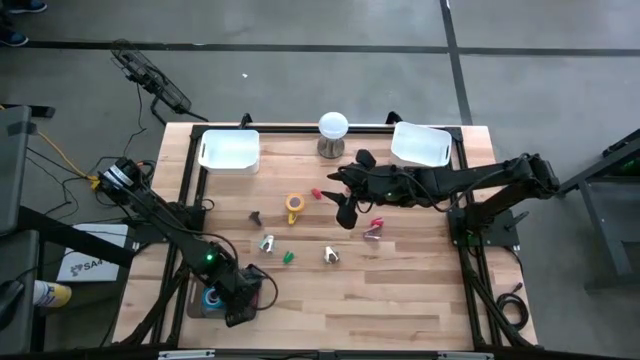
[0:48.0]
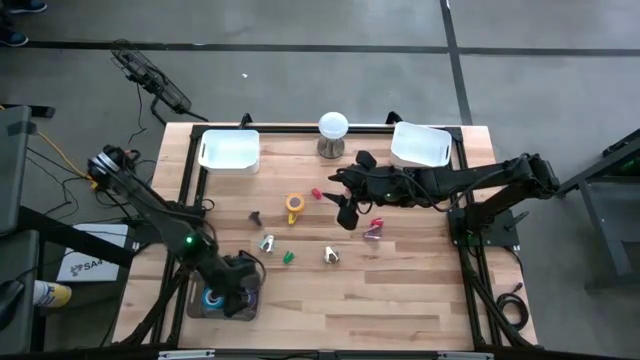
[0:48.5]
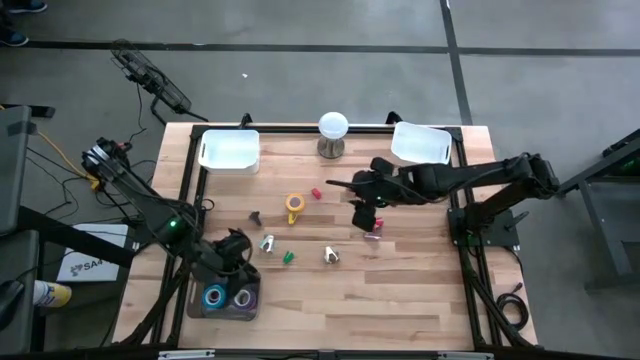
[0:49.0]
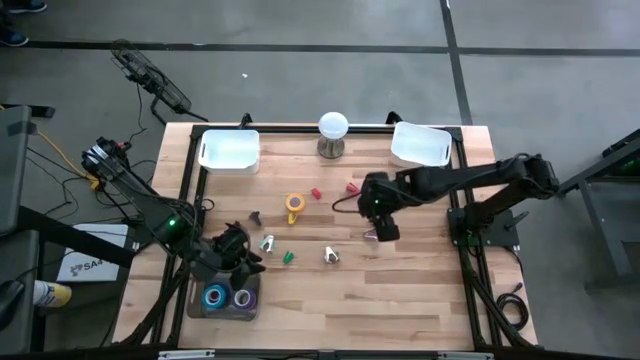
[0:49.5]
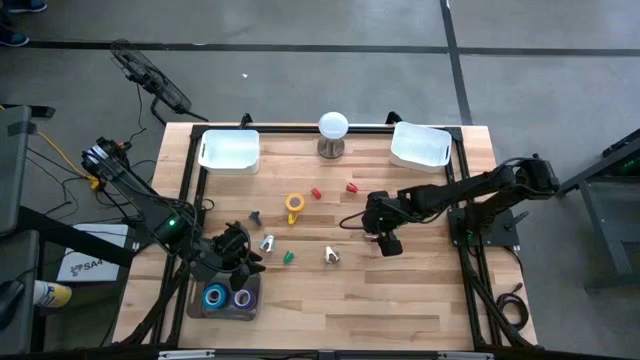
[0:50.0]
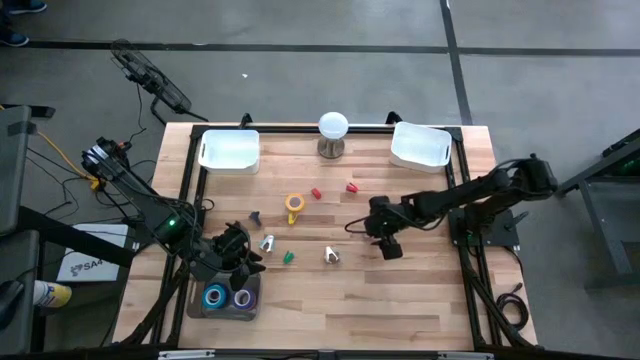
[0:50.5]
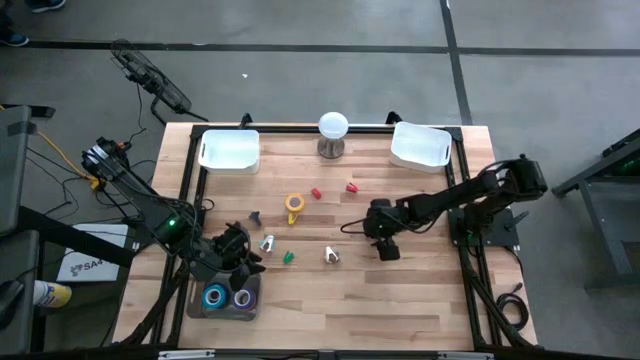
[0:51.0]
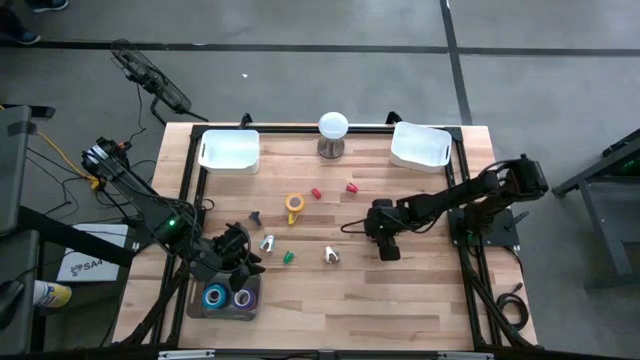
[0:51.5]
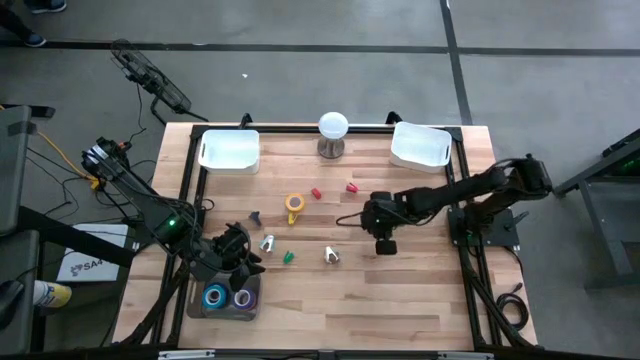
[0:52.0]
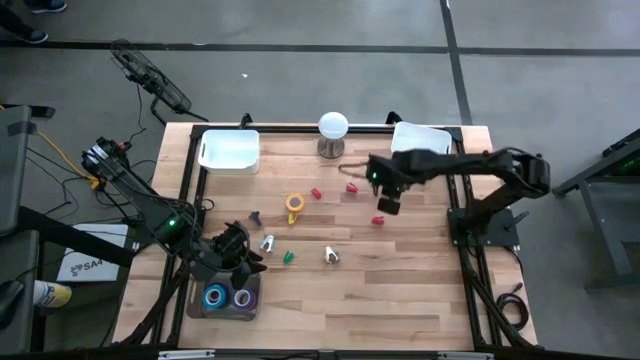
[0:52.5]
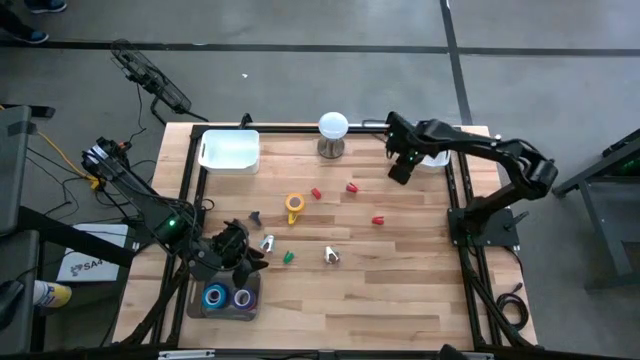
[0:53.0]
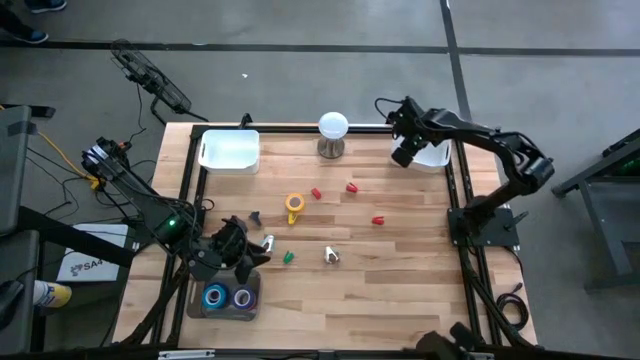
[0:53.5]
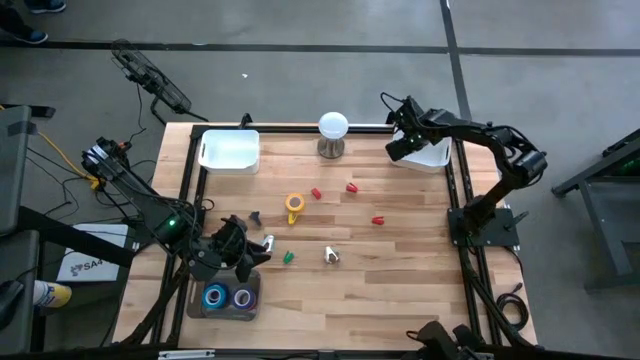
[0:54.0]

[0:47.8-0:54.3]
Task: Pick and place Stapler, Stapler remover, tape
Put the pink staple remover into the right white bin

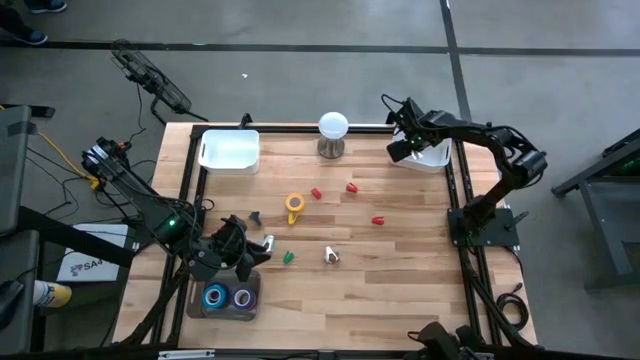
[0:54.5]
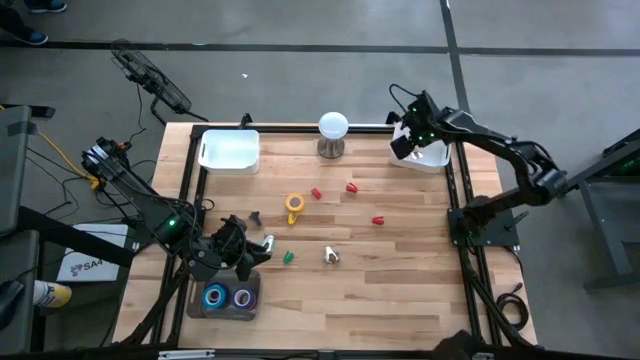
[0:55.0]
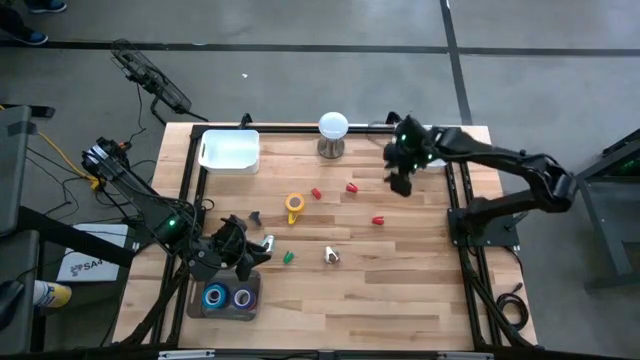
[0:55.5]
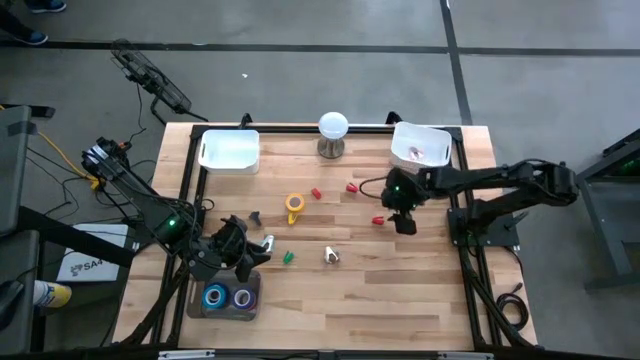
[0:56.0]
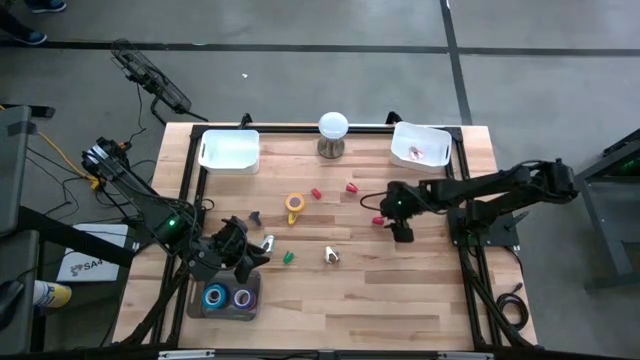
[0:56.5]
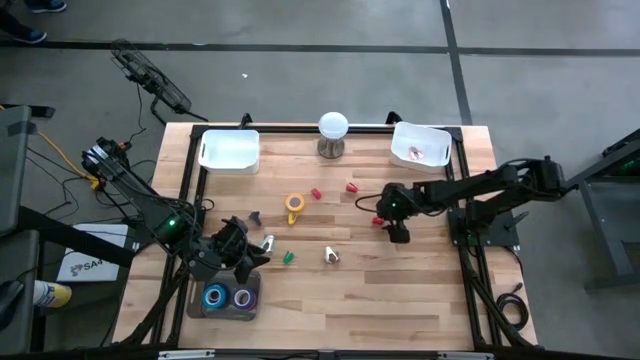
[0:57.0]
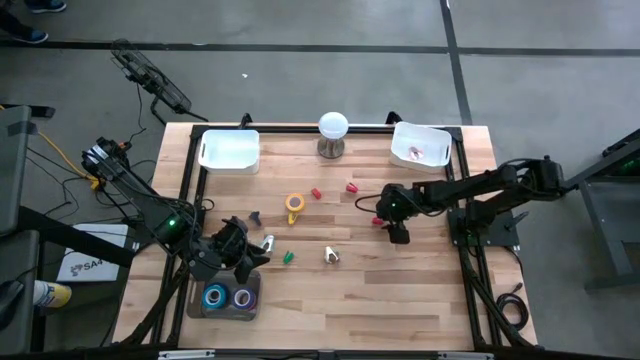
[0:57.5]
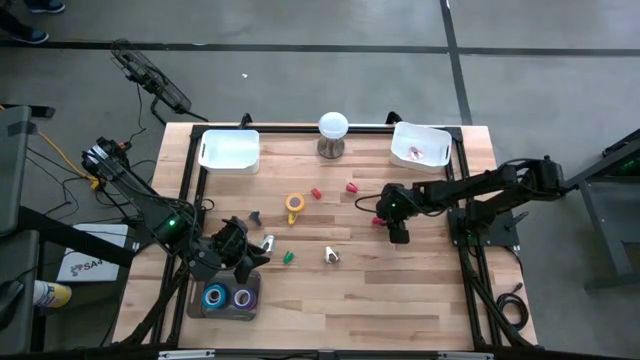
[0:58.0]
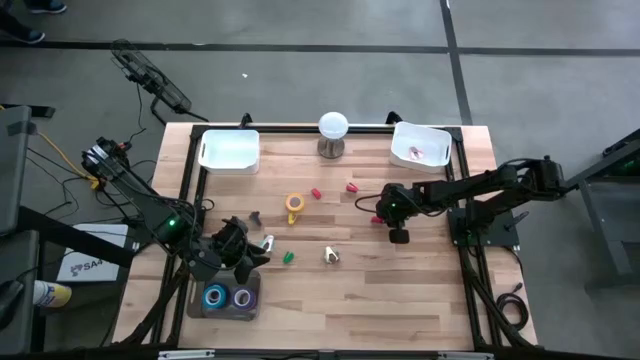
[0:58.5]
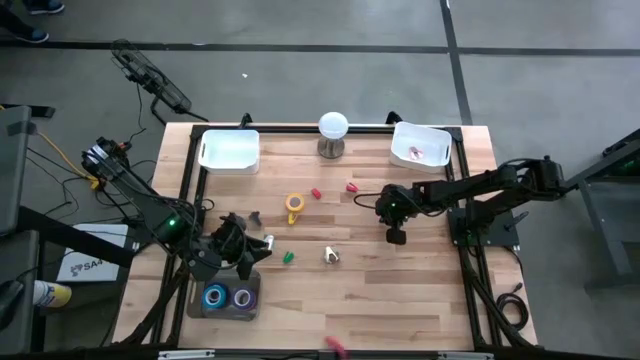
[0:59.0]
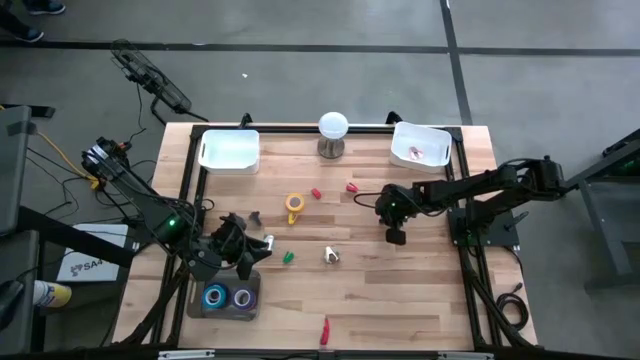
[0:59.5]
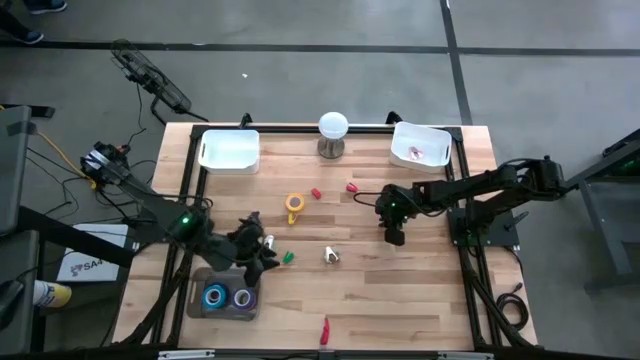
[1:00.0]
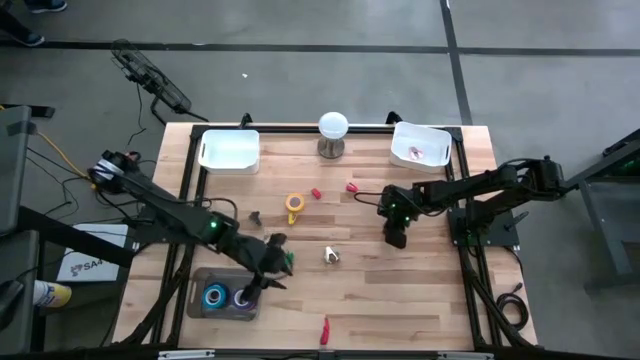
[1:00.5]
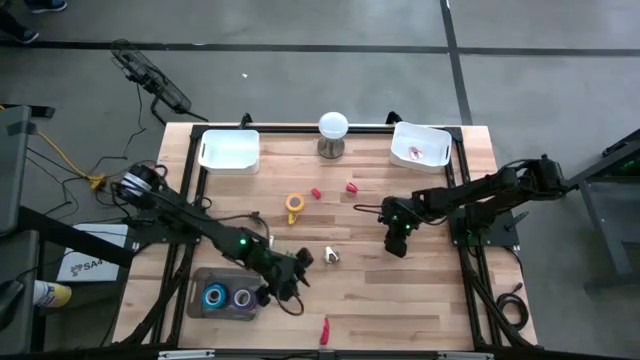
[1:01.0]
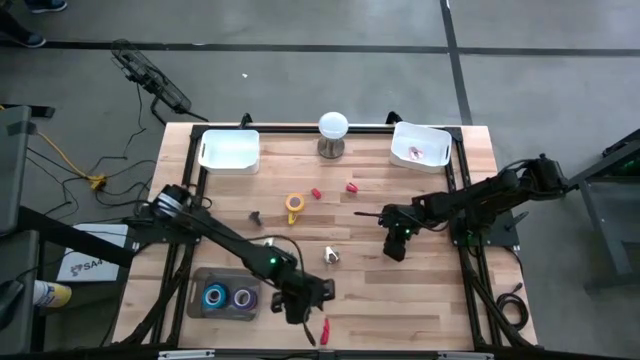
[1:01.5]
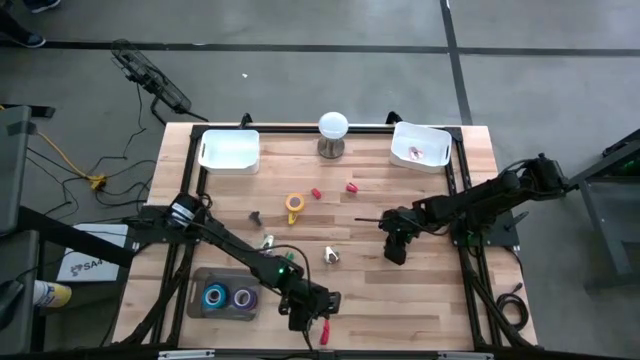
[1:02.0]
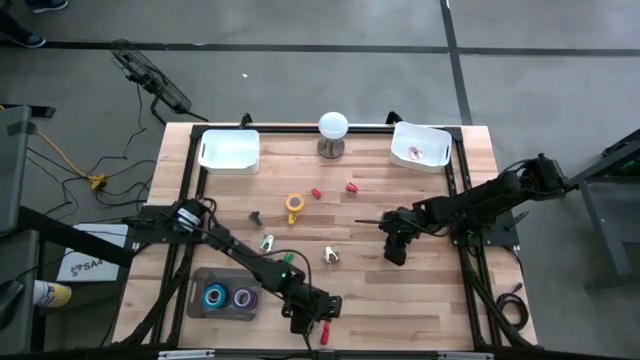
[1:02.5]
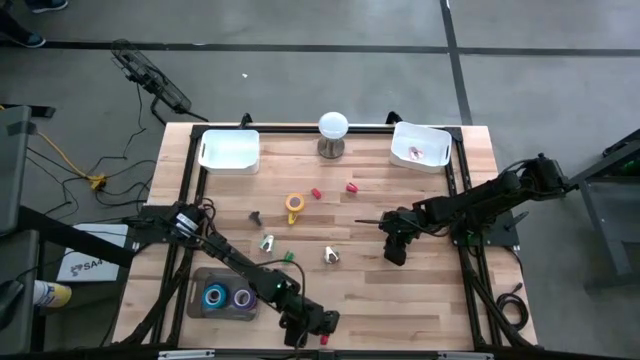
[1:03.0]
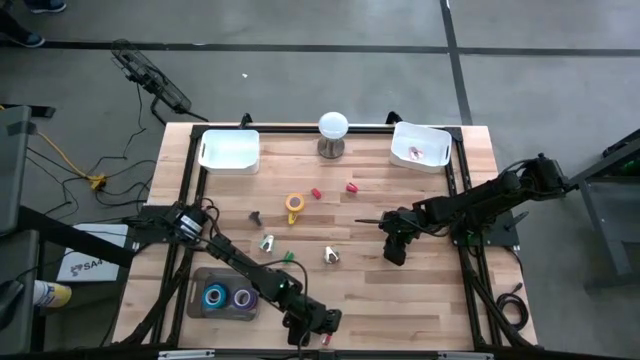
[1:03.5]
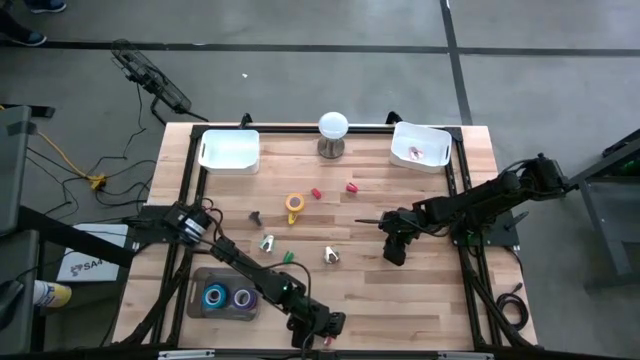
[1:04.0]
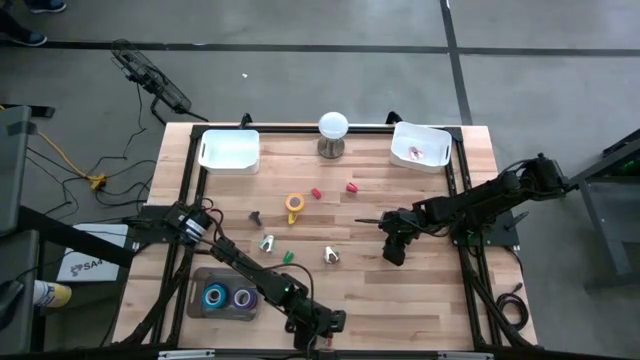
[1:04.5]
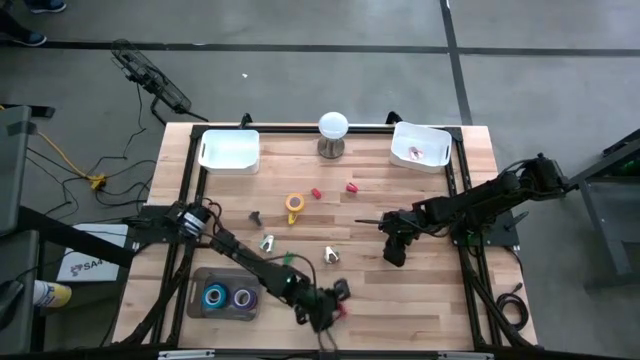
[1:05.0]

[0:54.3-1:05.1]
Put the bottom right red stapler into the left white bin

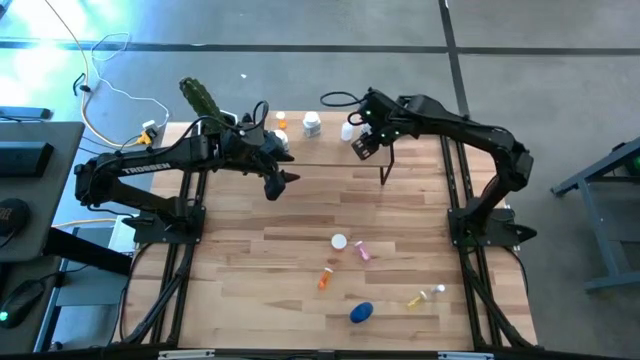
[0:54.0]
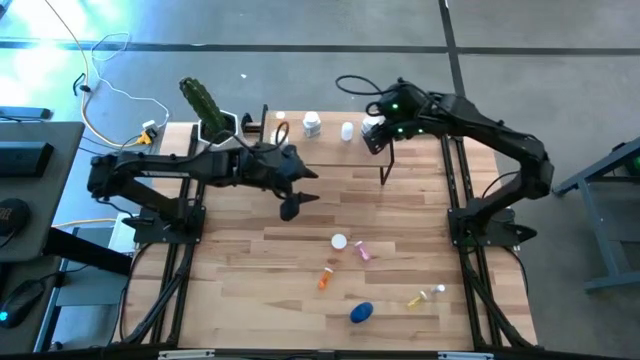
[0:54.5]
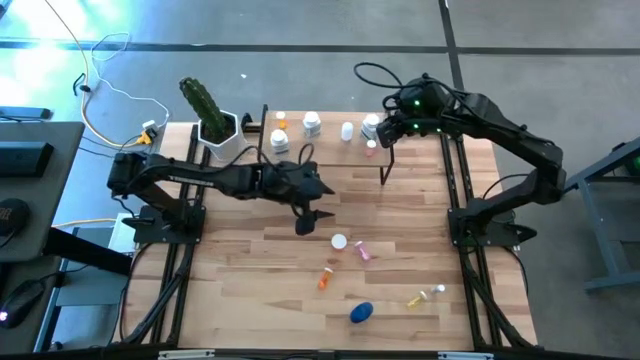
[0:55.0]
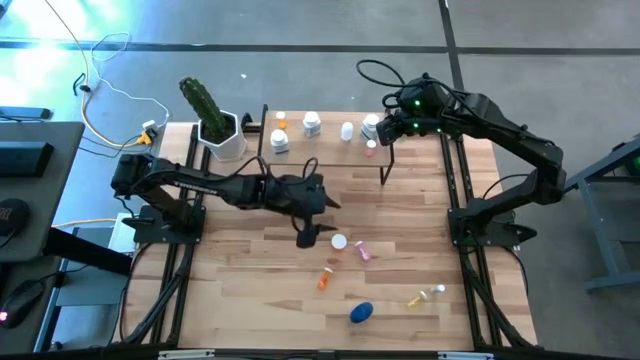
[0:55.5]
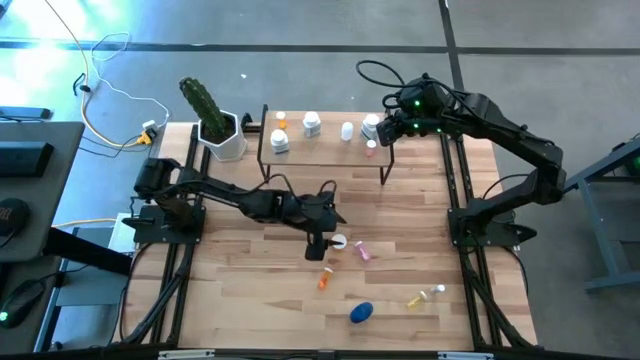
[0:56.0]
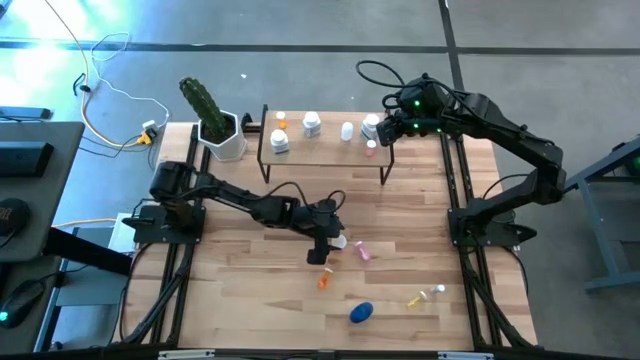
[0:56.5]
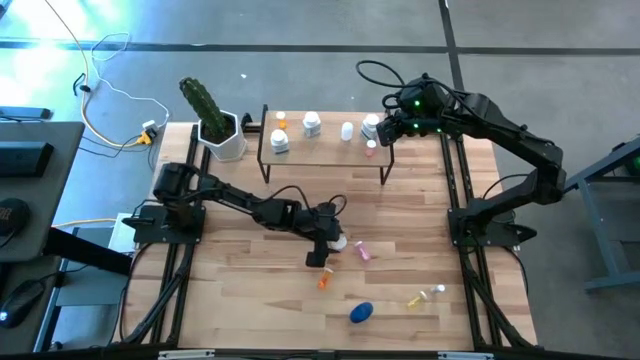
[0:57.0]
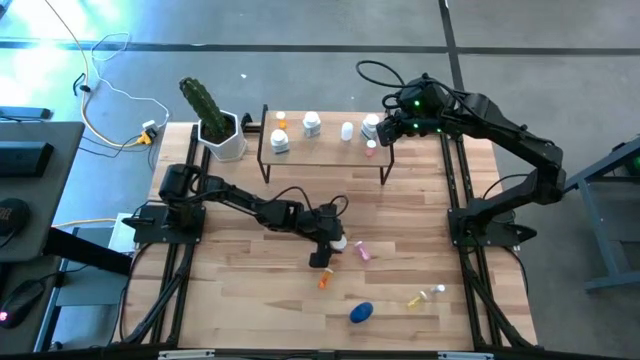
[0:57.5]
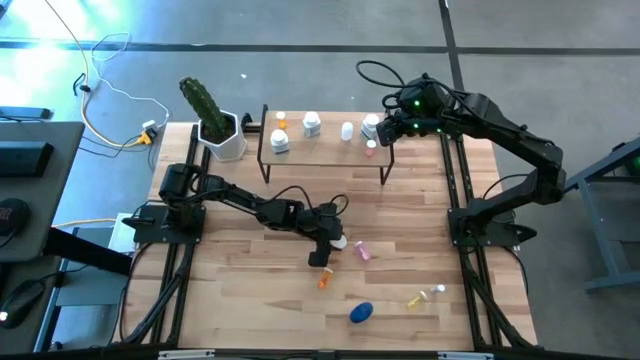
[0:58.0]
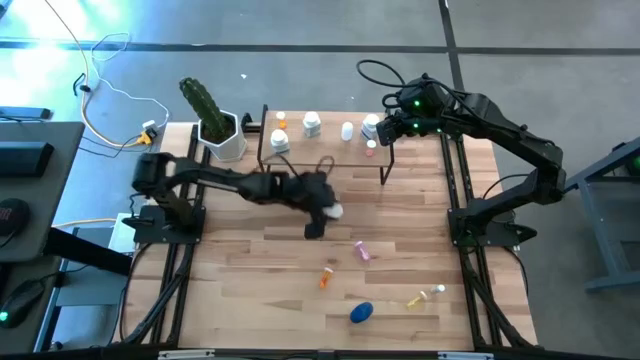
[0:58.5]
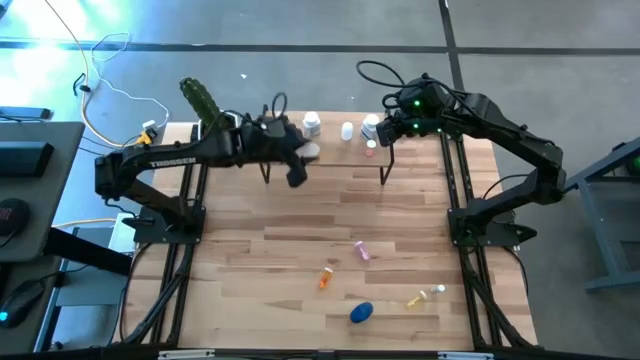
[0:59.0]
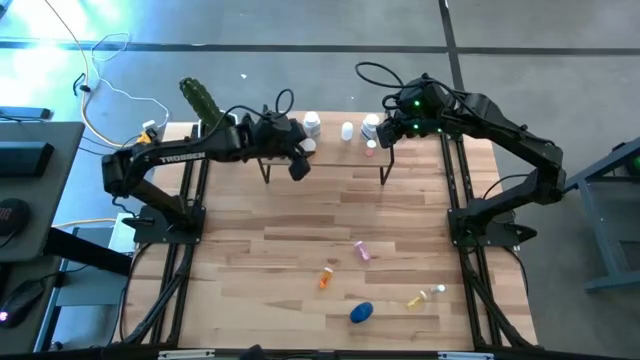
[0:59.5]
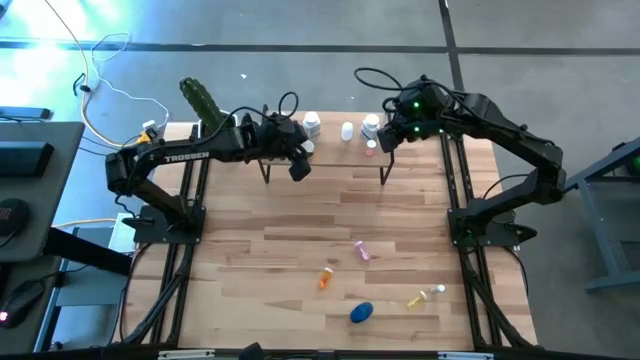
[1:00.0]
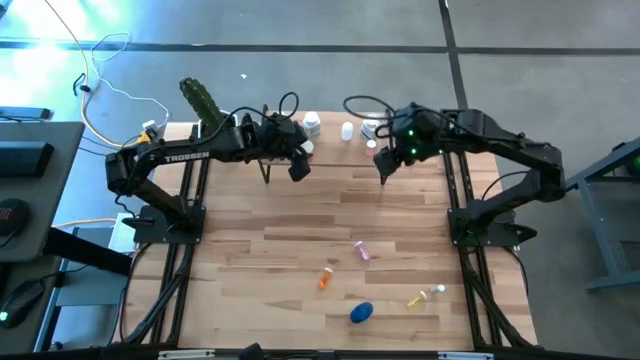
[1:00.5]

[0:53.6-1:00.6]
Task: Pick and place medicine bottles onto shelf by color
Put the top orange pill bottle on the shelf
